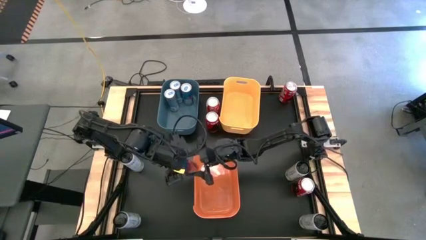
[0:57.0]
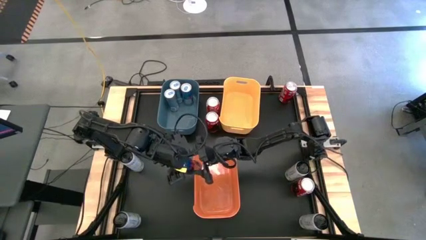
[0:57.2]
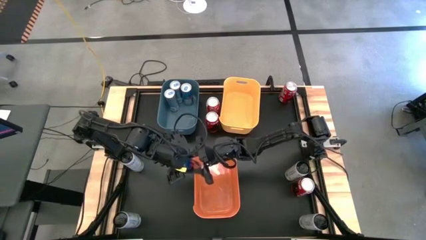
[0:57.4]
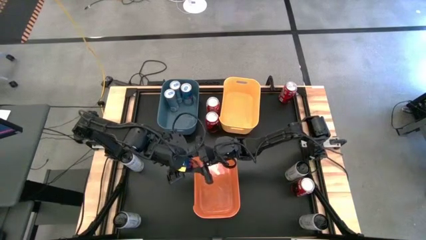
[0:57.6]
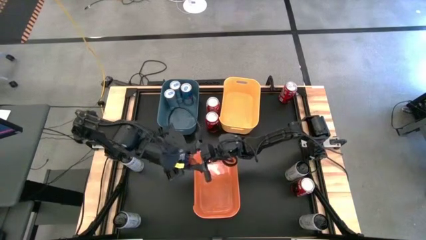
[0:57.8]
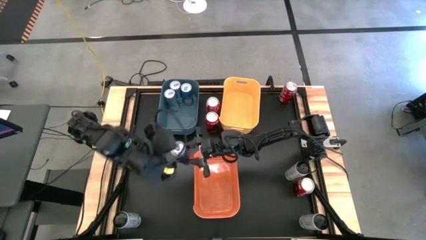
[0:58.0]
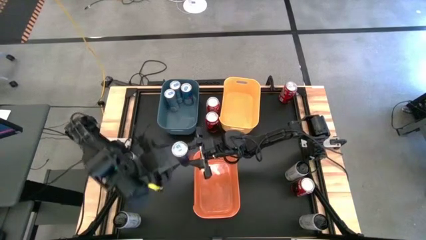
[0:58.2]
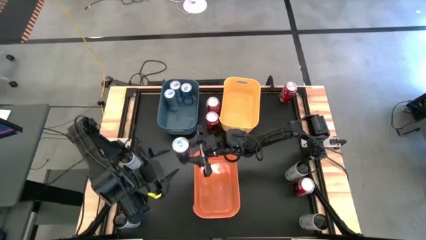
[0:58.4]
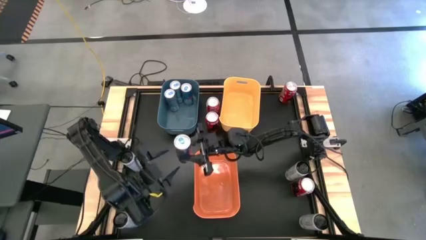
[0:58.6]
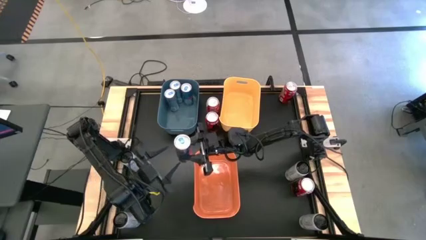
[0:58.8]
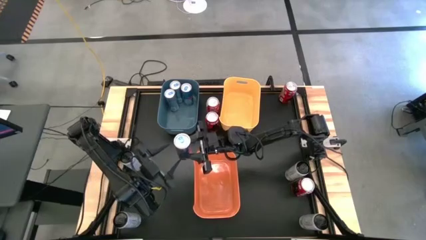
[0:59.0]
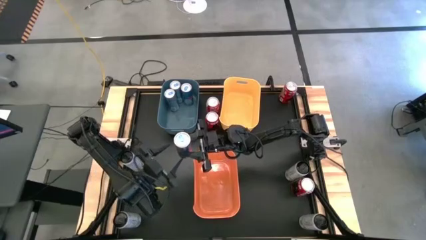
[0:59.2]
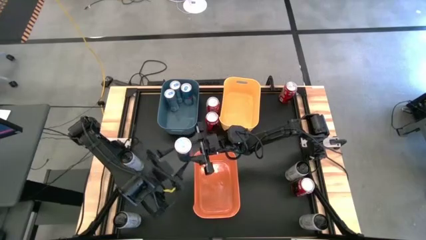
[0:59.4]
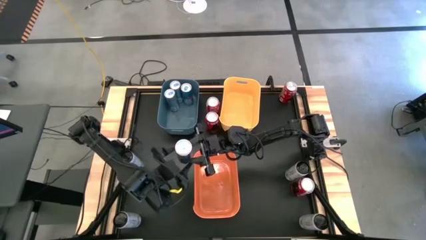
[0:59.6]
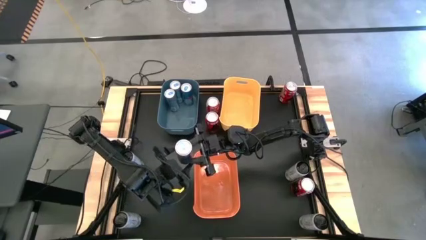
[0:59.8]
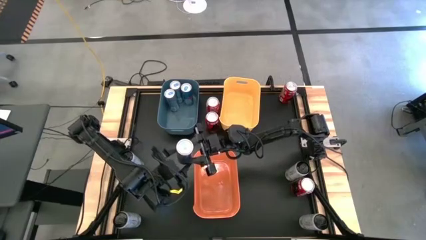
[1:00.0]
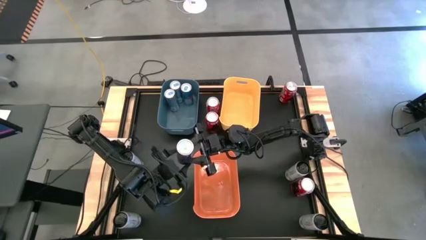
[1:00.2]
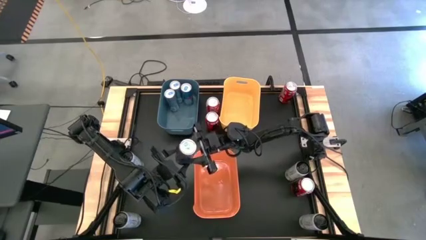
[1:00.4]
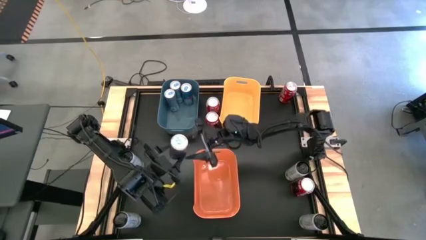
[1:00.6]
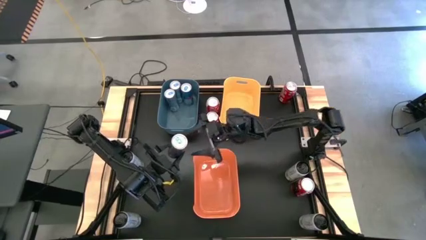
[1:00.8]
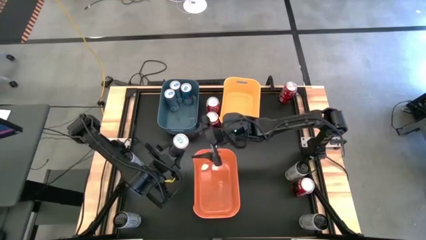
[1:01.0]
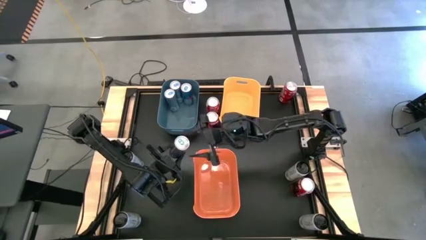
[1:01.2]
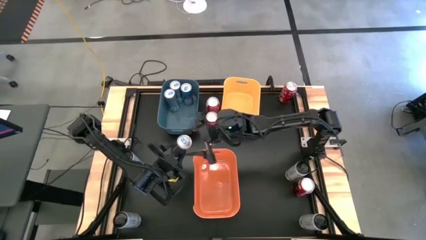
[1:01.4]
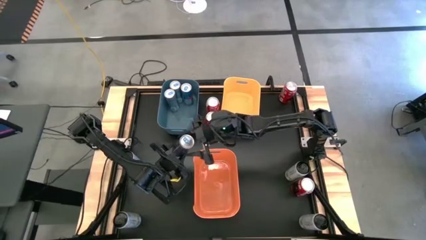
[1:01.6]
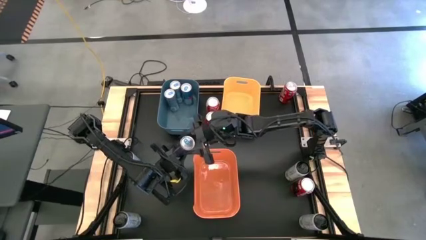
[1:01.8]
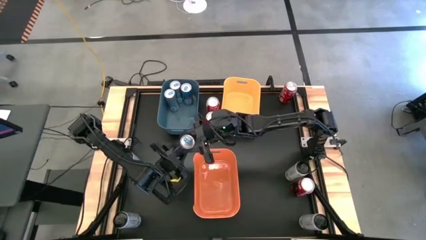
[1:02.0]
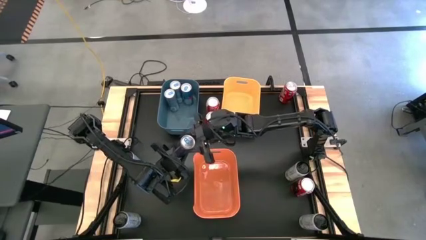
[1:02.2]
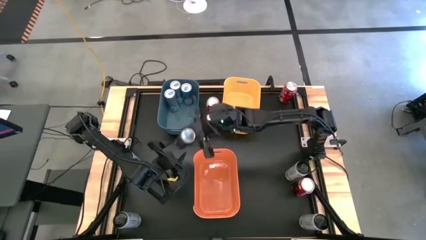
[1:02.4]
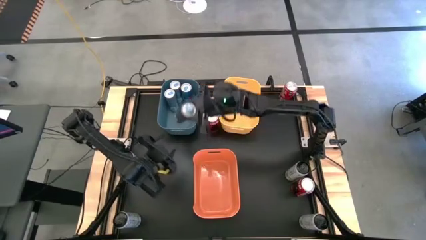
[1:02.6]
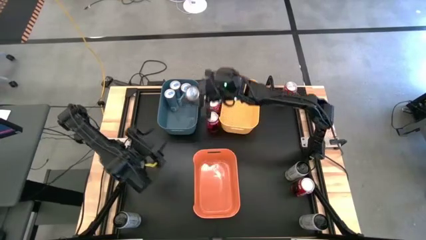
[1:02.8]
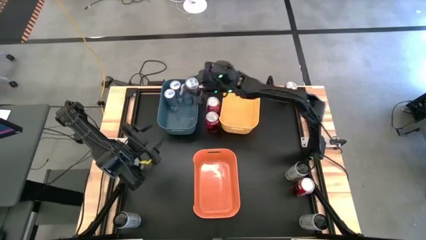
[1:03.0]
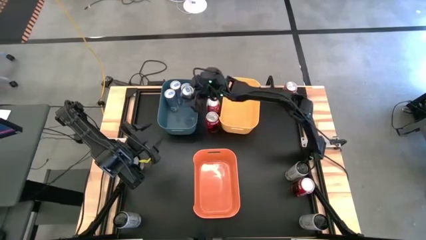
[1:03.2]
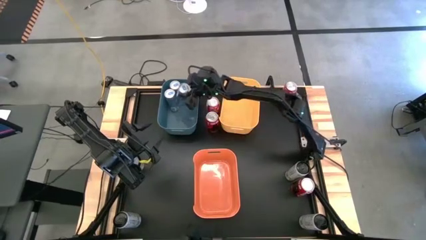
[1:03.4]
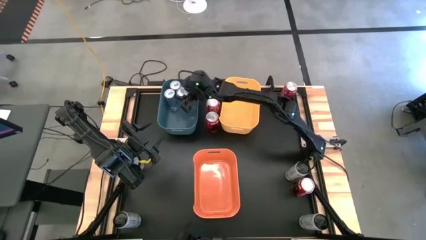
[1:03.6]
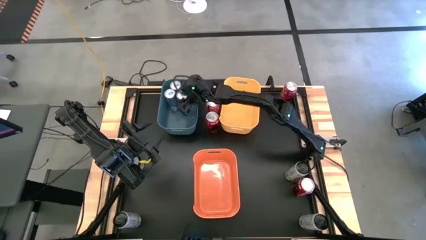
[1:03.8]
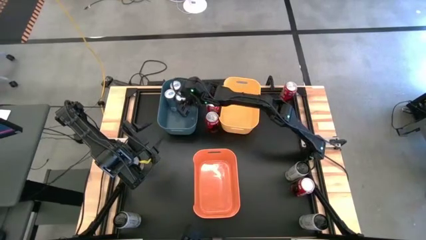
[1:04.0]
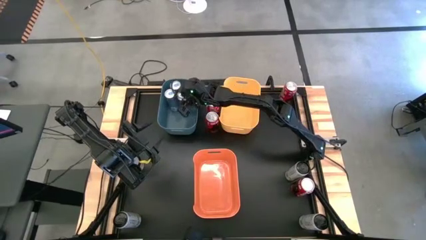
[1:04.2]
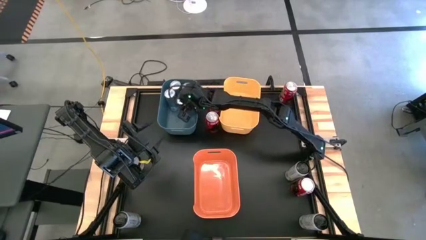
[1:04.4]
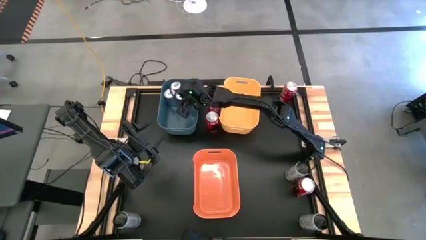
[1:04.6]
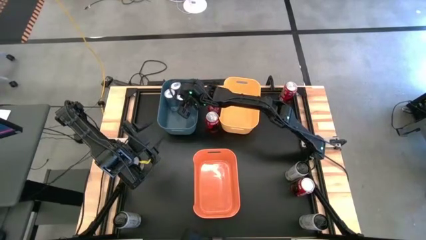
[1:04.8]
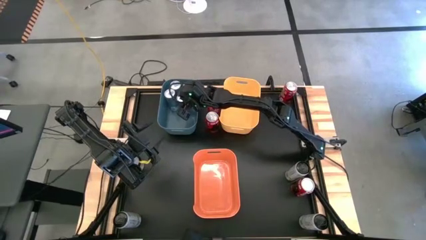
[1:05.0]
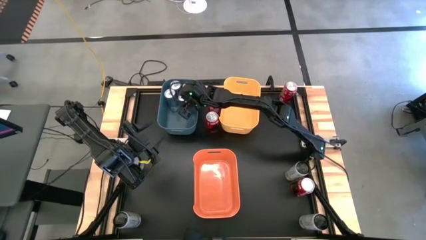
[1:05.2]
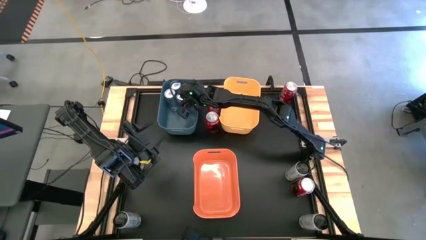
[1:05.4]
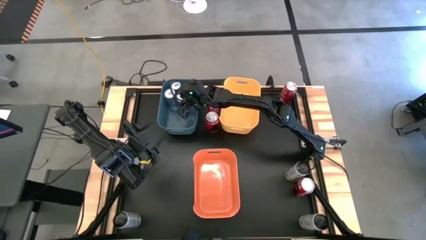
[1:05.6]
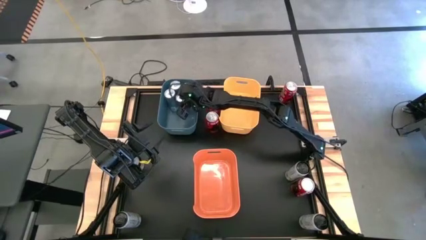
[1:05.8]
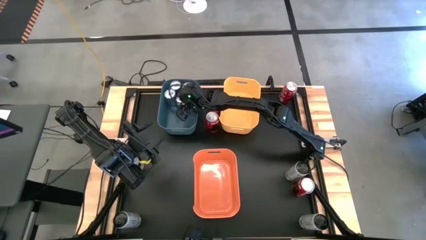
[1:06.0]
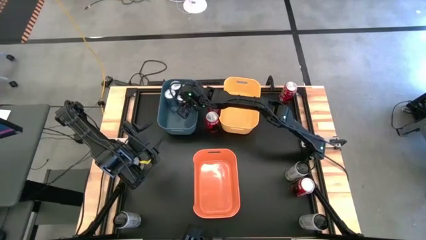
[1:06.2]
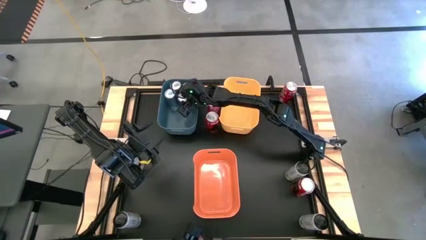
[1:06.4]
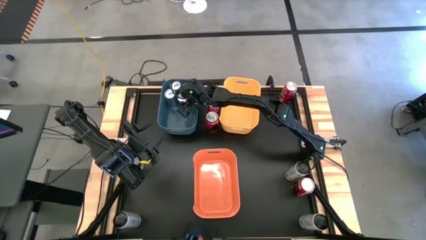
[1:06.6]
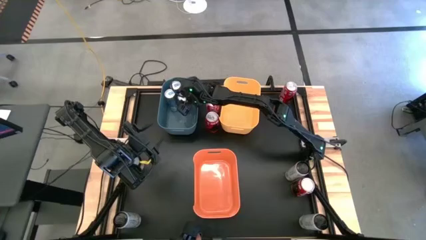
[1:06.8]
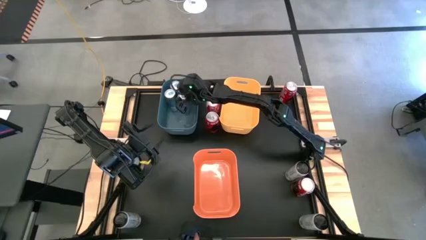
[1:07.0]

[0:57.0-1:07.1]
Task: Sort soda cans
Put the blue soda can into the blue bin

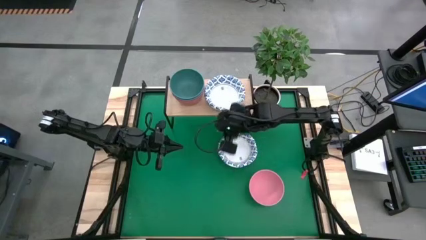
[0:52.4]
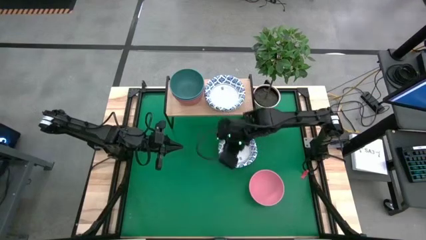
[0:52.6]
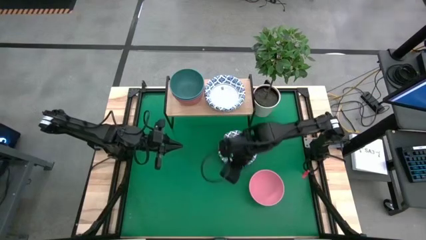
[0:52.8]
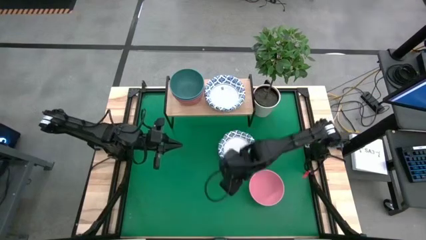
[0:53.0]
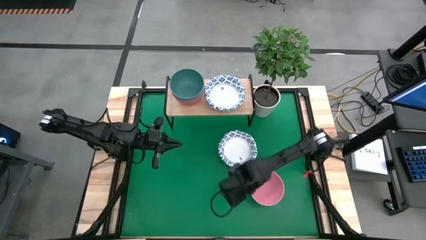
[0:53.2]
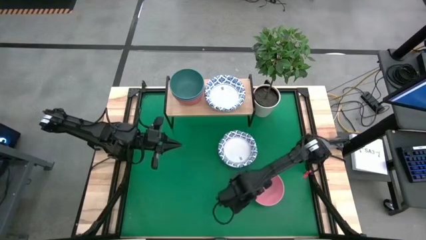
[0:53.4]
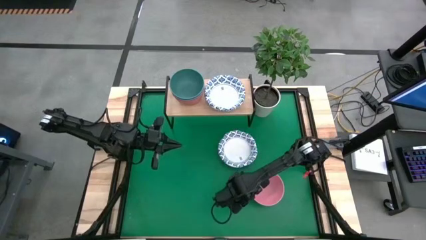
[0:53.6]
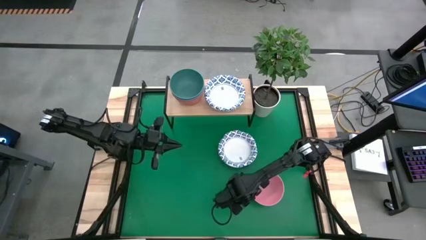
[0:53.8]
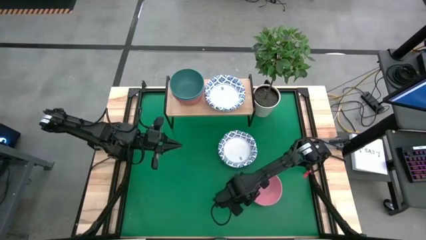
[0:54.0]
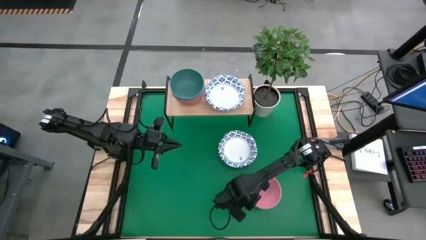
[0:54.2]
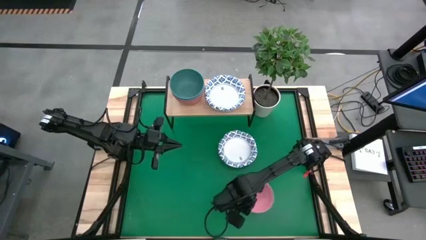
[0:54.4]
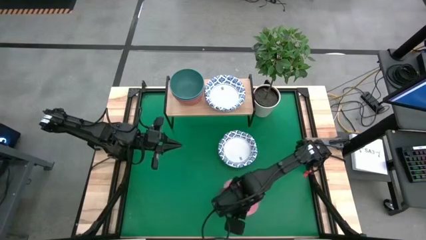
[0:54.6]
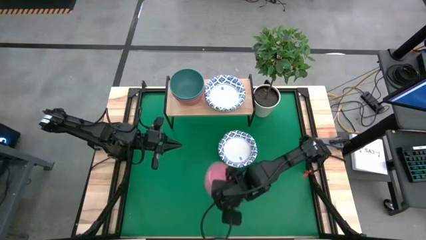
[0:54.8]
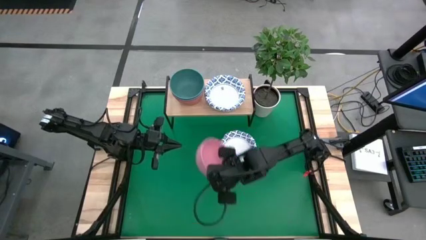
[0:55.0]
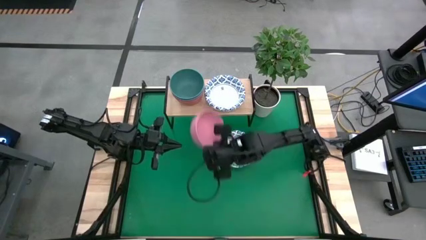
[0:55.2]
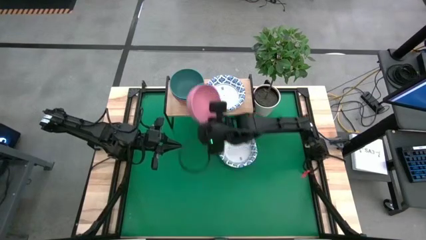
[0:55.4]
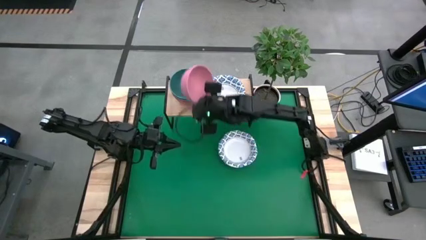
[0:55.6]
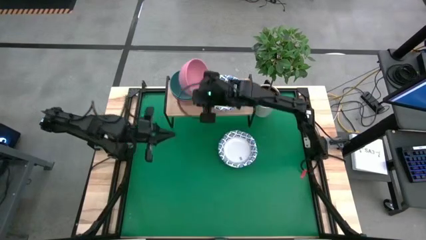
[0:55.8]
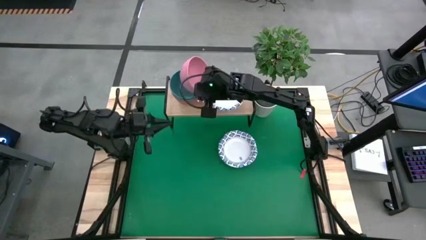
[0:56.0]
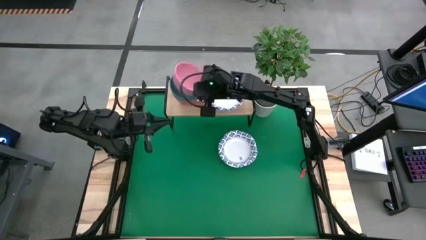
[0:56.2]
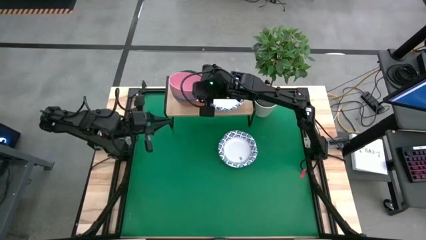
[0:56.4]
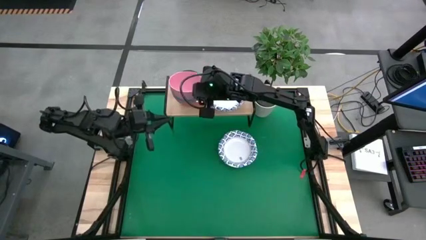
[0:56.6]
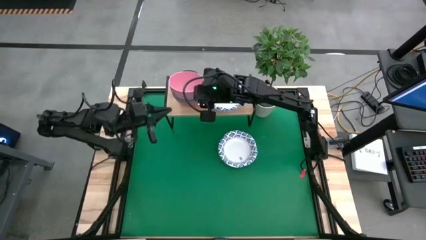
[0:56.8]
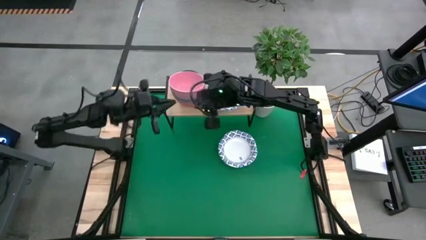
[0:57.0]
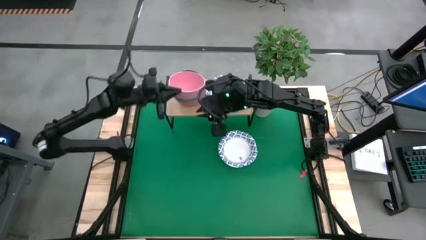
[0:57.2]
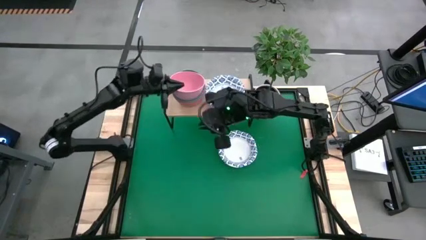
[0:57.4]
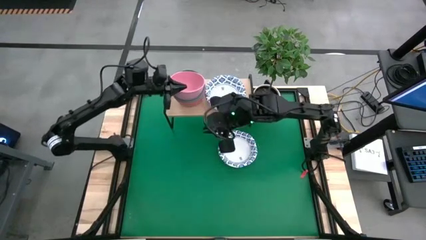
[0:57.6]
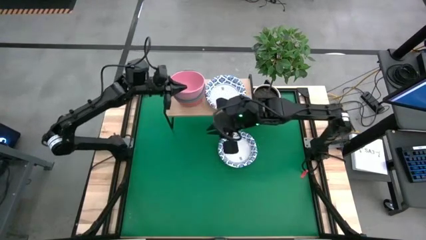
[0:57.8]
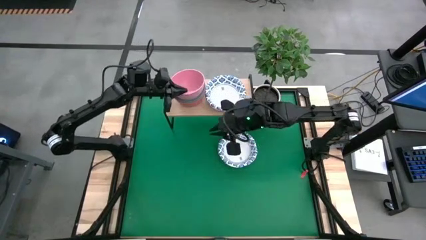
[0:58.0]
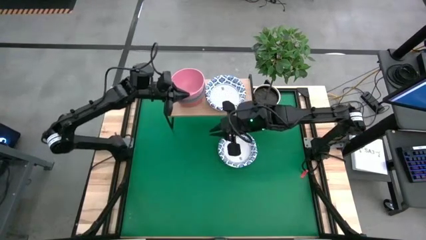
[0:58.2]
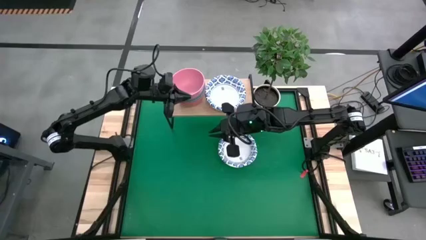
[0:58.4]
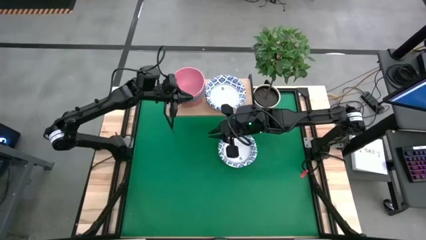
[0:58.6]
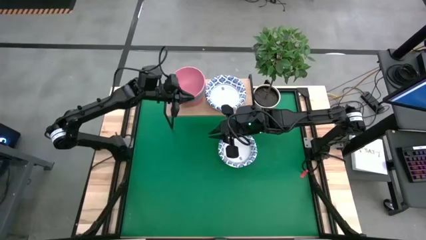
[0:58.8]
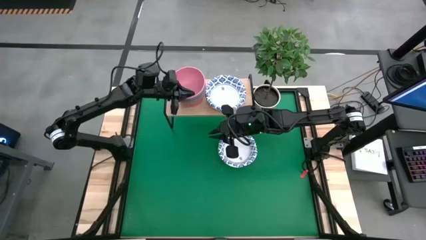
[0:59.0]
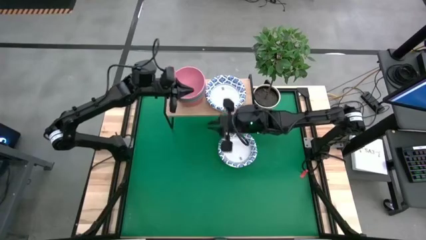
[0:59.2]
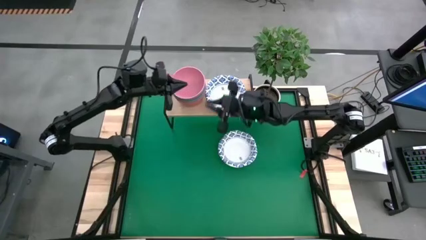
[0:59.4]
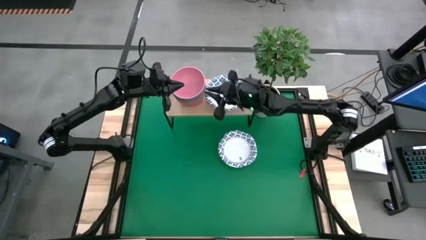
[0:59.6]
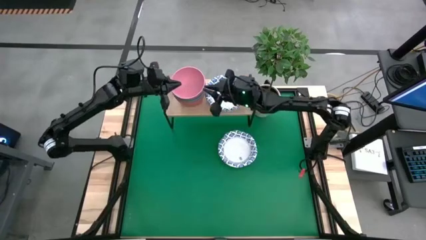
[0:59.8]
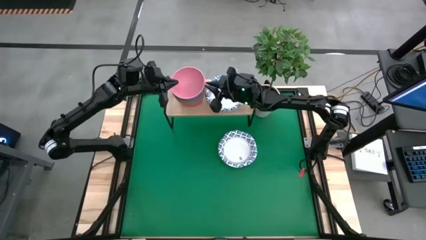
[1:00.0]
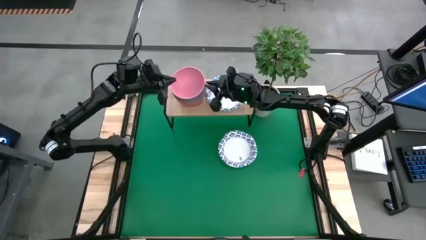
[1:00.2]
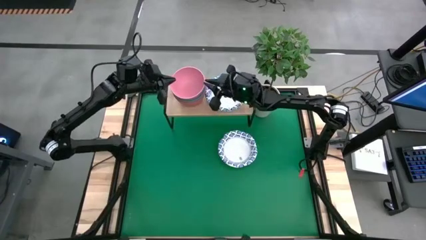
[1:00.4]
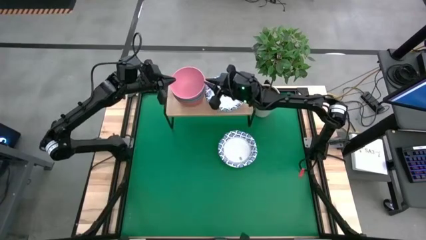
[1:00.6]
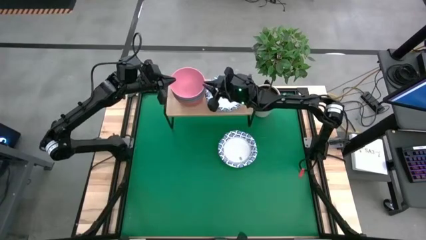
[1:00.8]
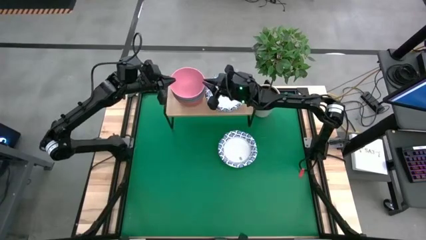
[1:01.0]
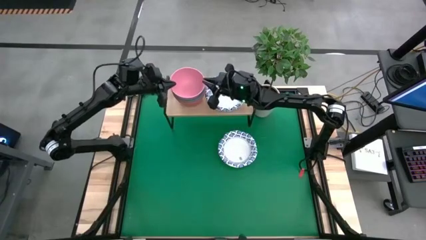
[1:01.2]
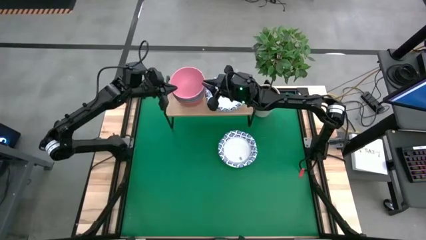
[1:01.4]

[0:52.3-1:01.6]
Task: Place and stack bowls onto a shelf
Stack the pink bowl on top of the green bowl on the shelf
